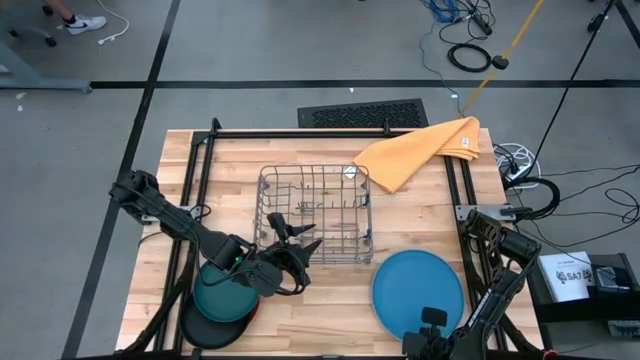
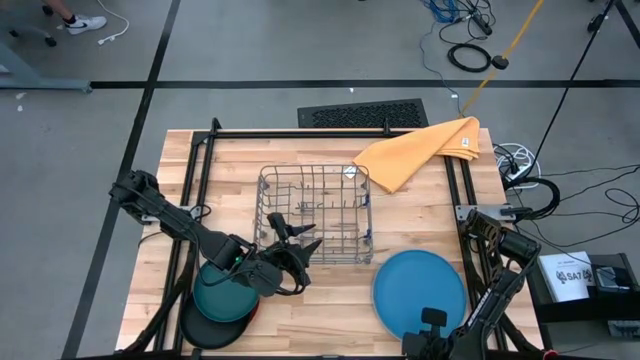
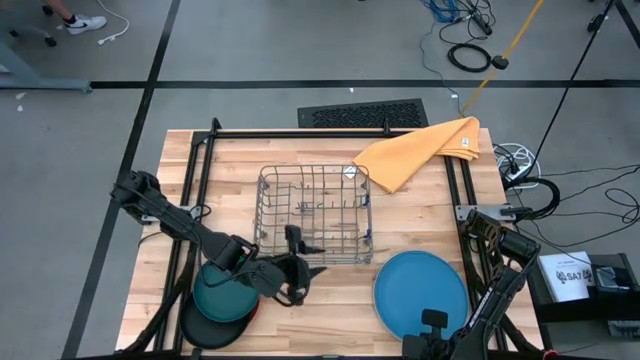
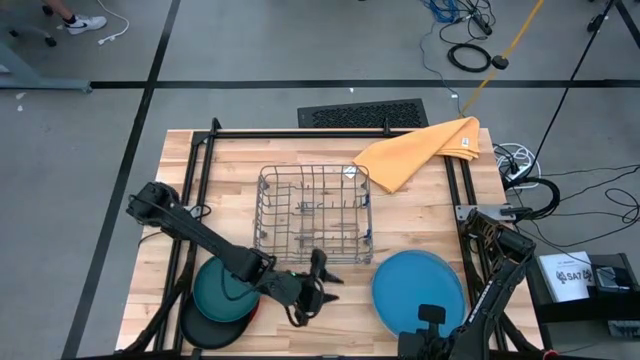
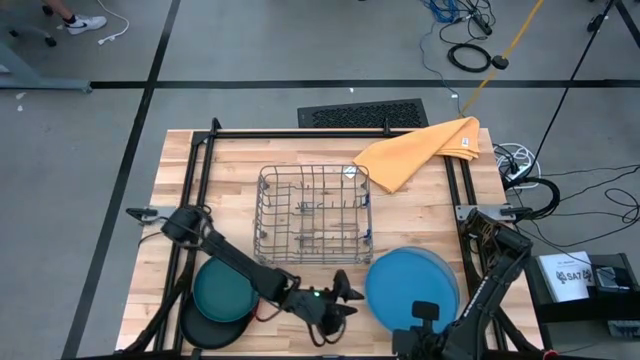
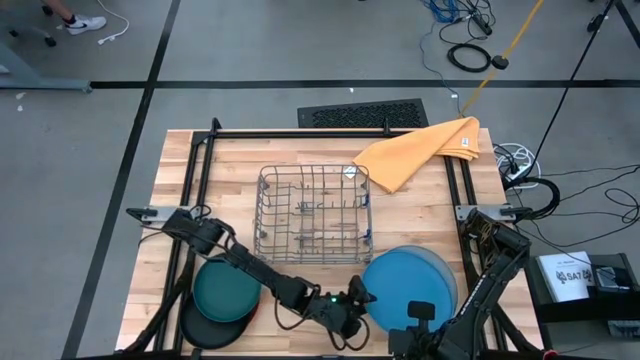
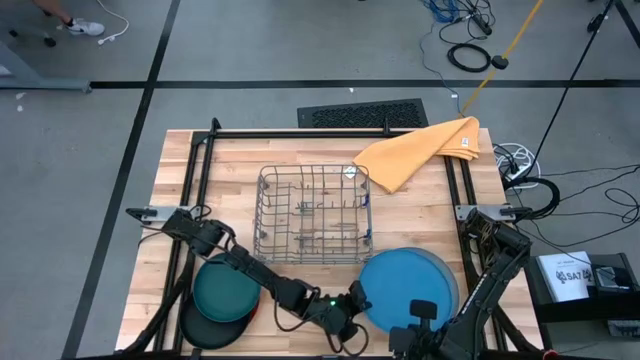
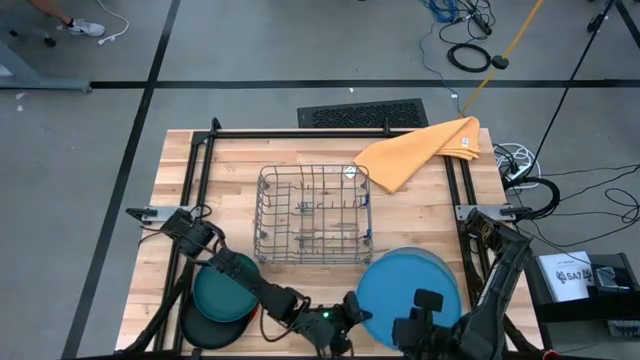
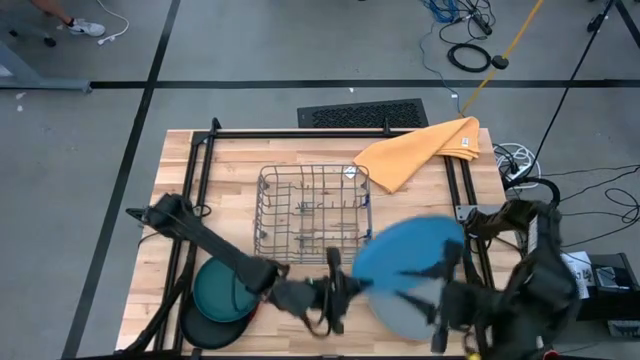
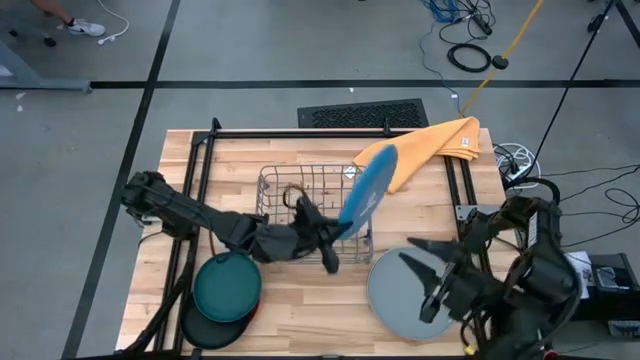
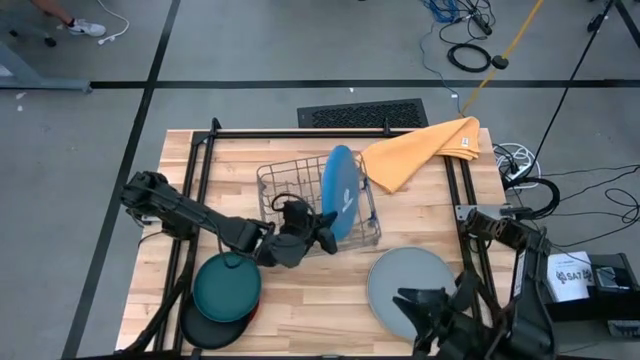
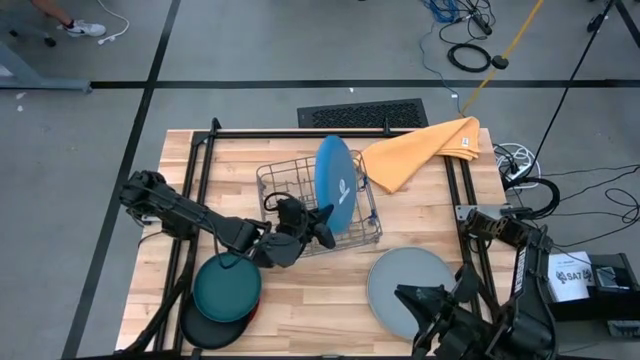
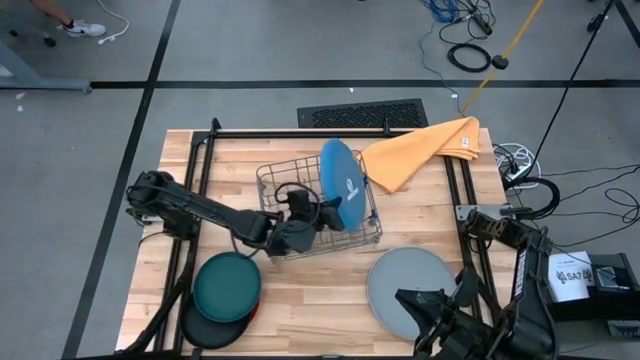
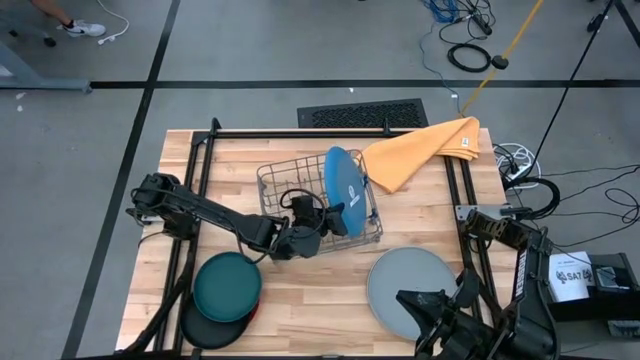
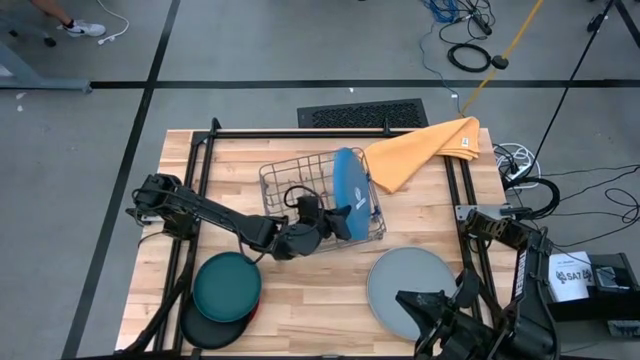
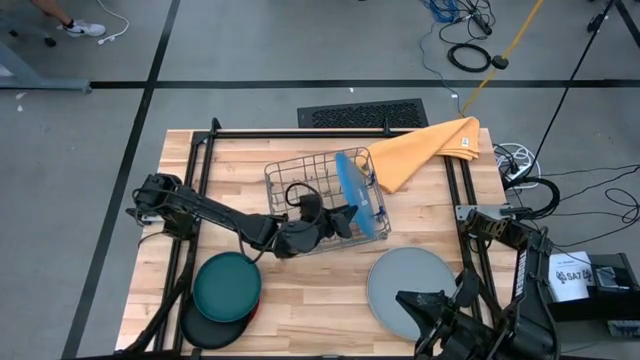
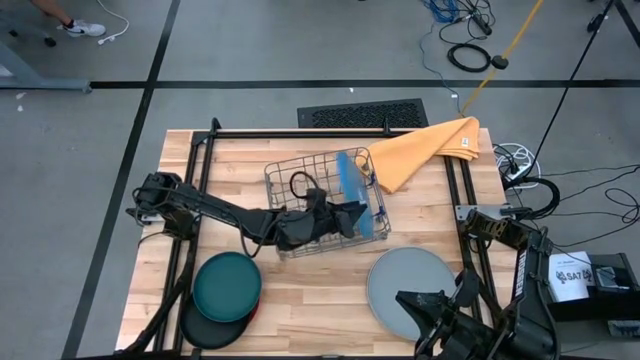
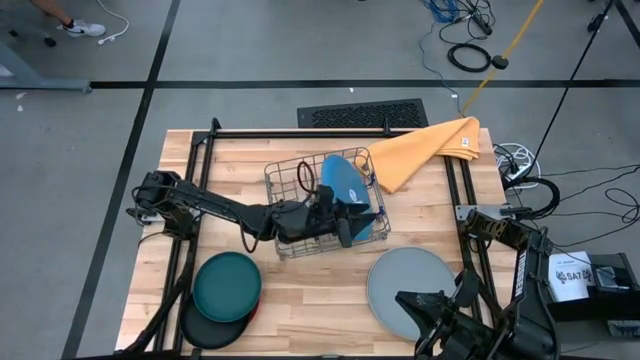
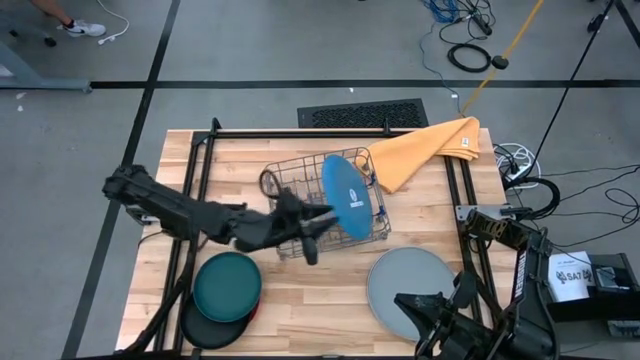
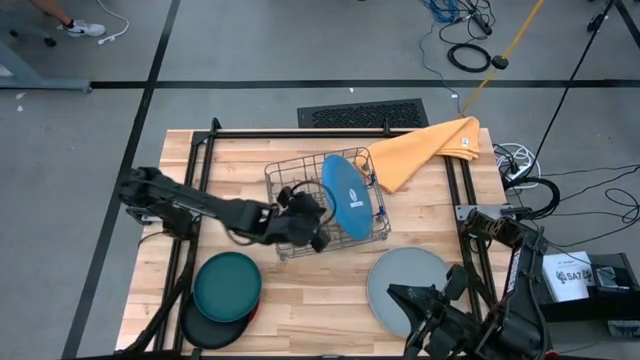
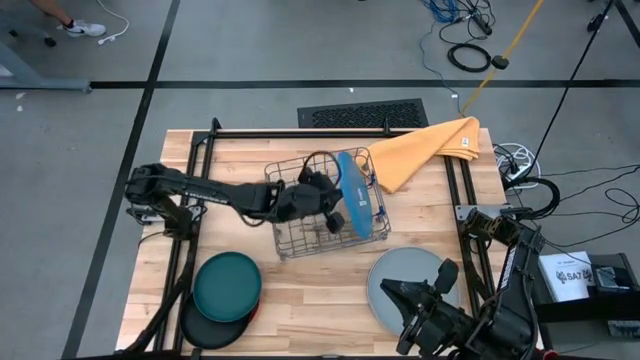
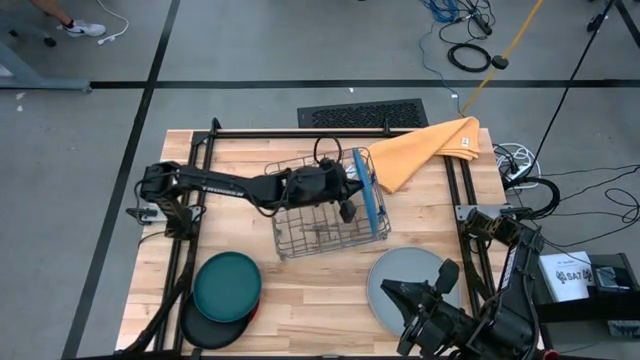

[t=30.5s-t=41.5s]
Task: Sort dishes
Put the blue plate into the green dish rack

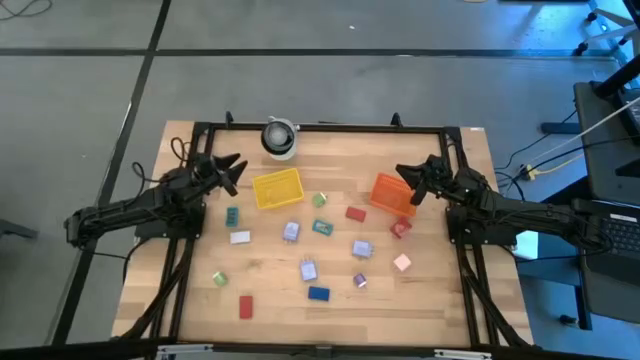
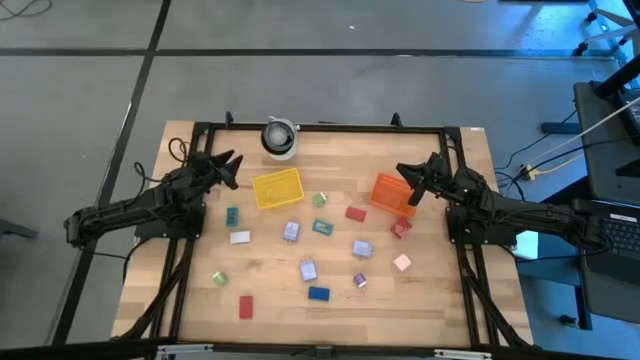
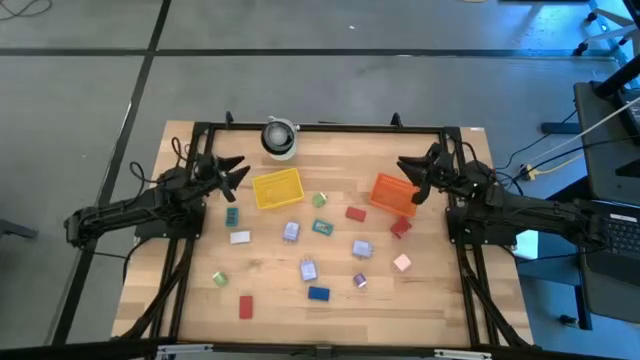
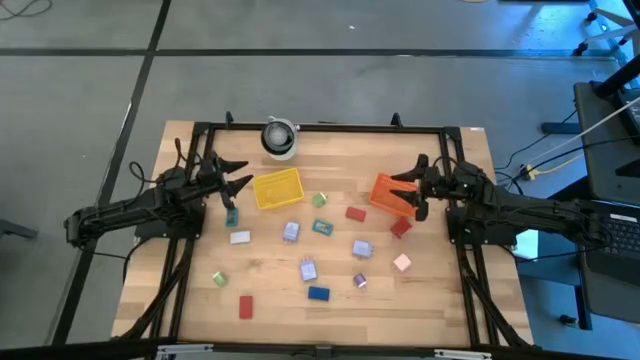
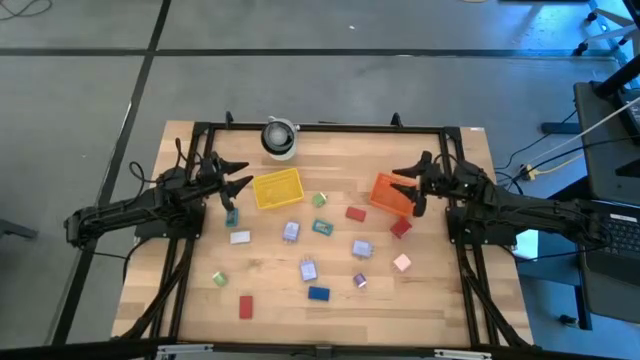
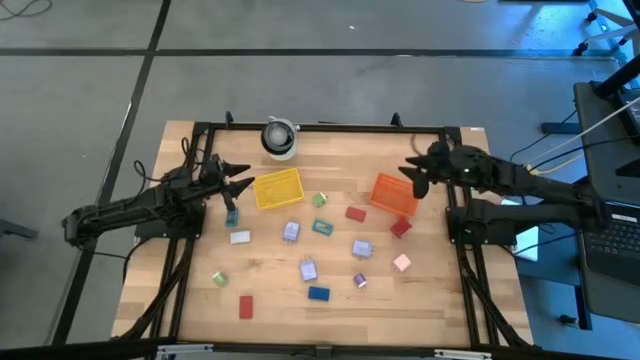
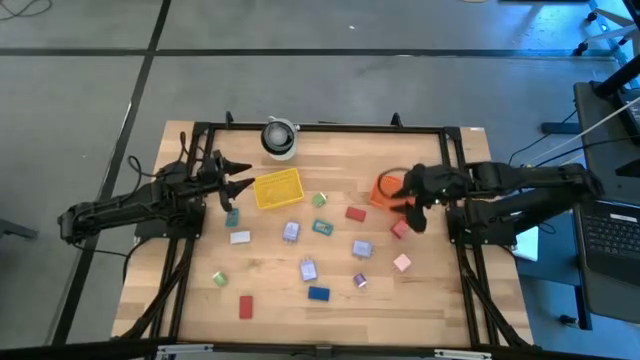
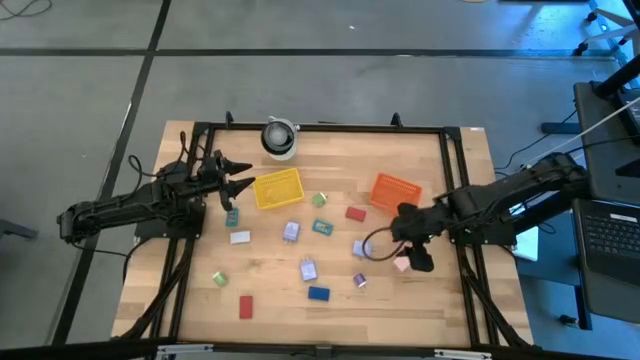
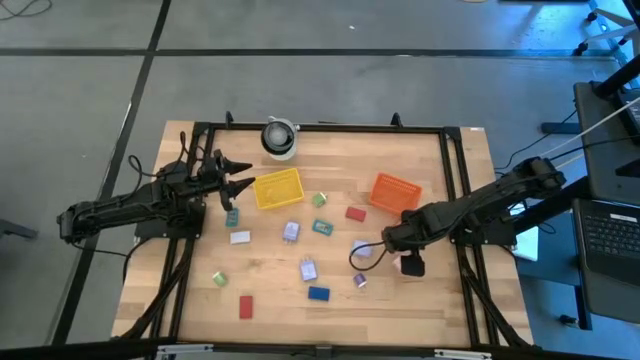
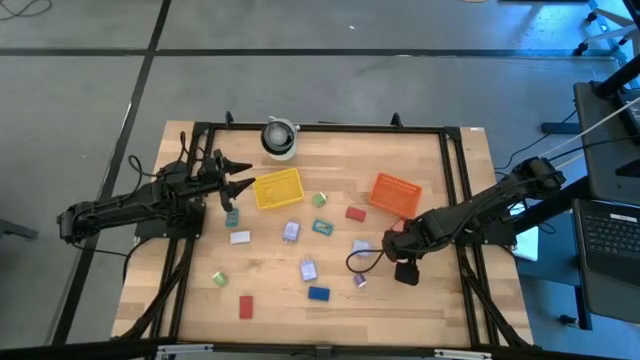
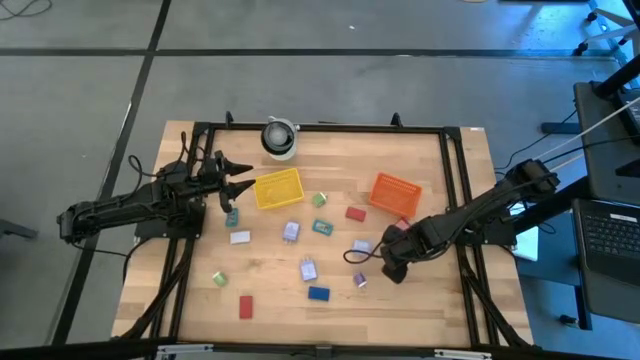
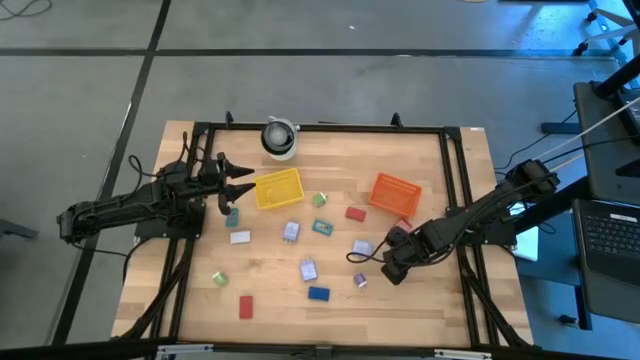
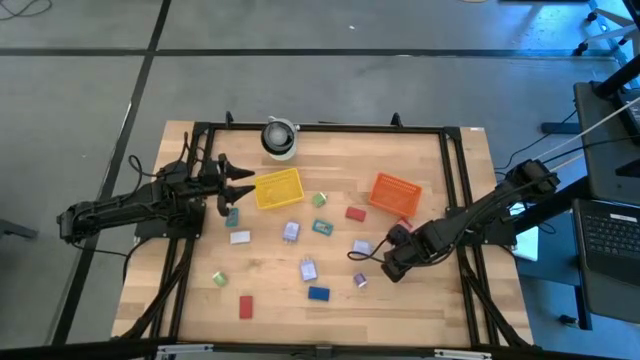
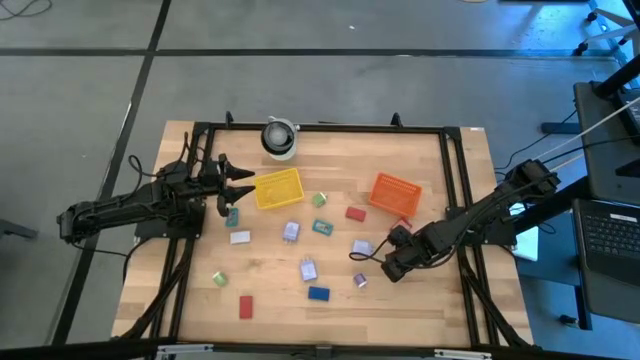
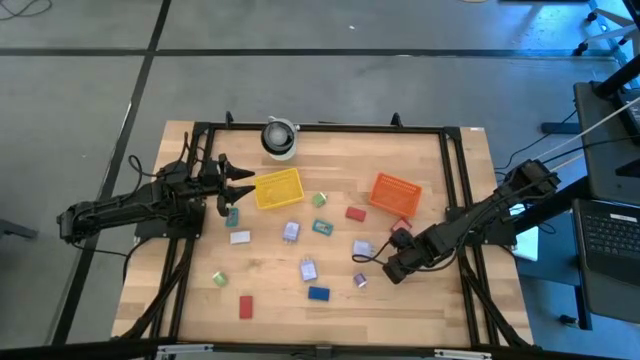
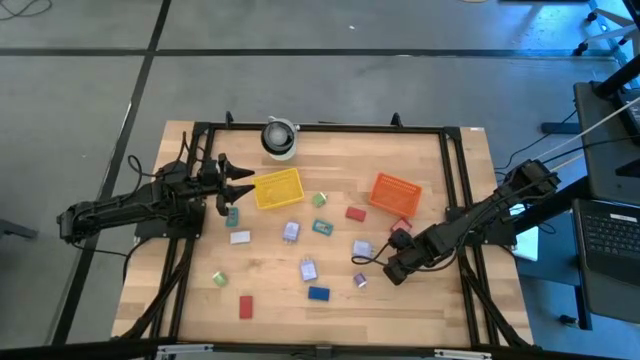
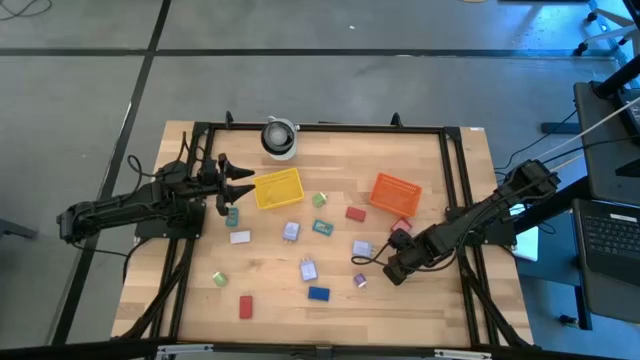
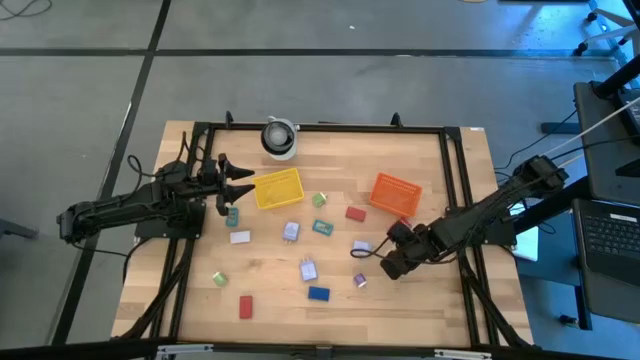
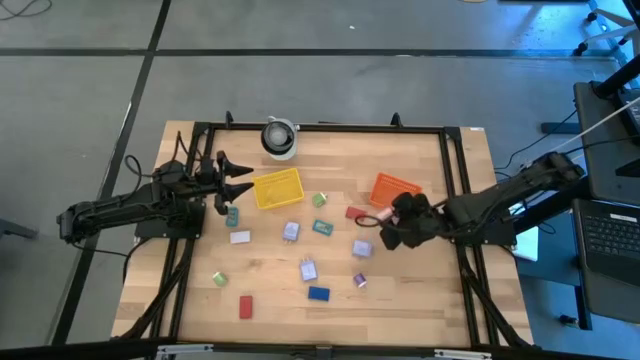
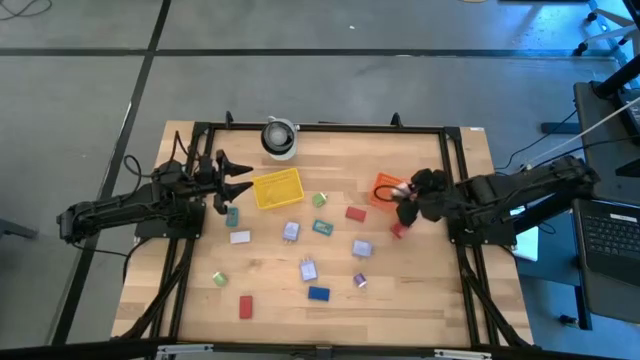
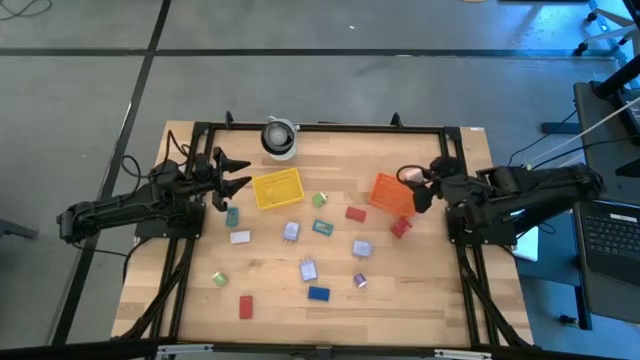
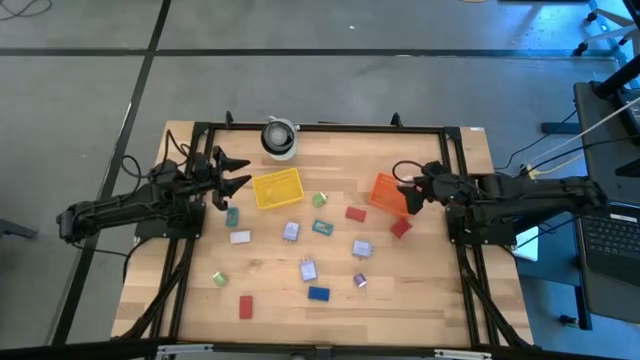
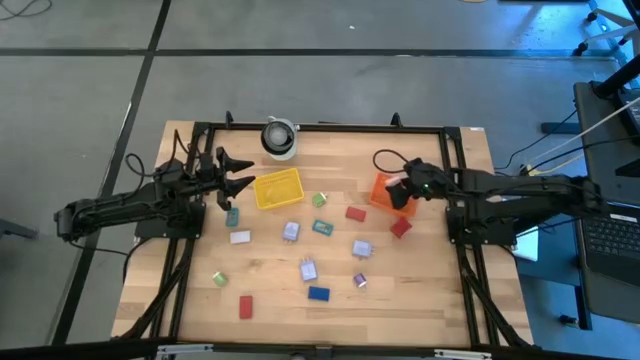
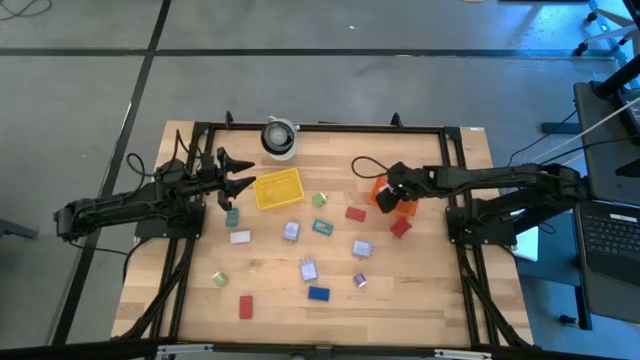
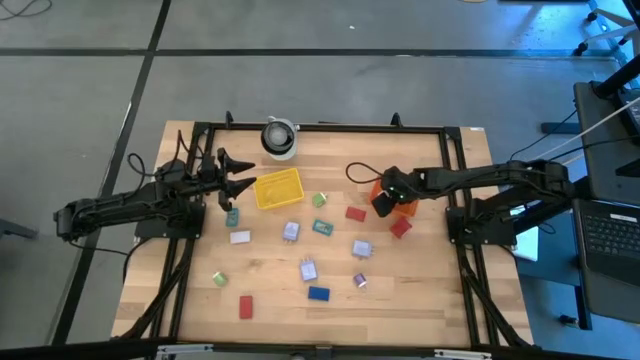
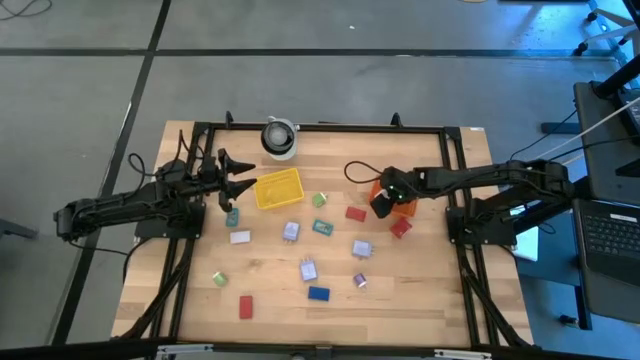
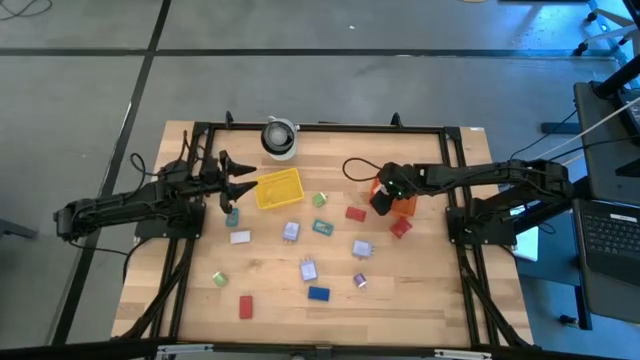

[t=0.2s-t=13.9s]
Task: Pick & Place Office items
Put the pink charger adapter into the orange bin
